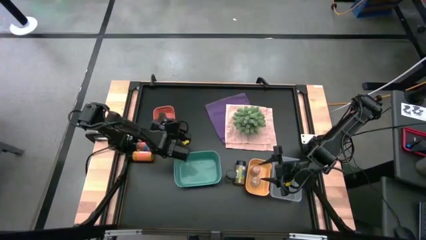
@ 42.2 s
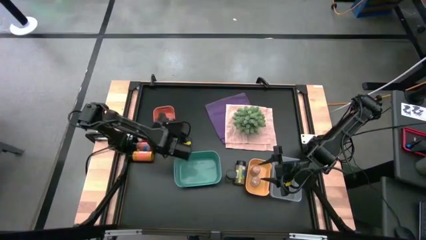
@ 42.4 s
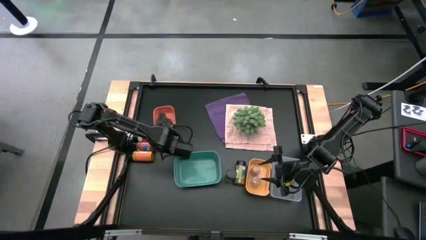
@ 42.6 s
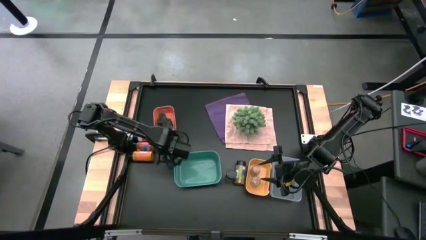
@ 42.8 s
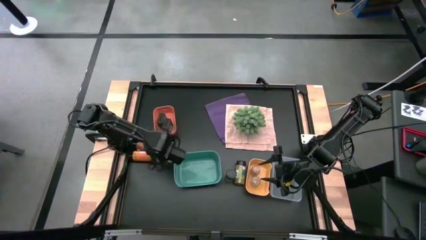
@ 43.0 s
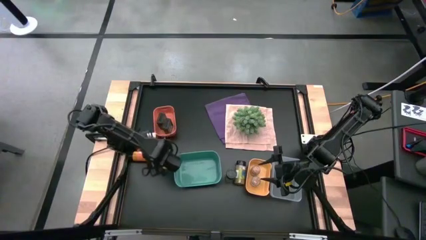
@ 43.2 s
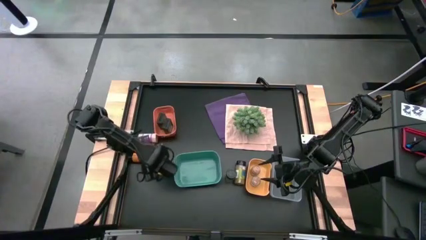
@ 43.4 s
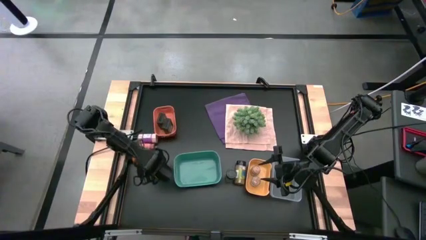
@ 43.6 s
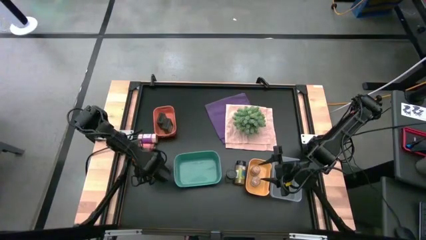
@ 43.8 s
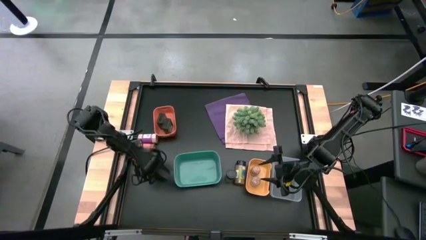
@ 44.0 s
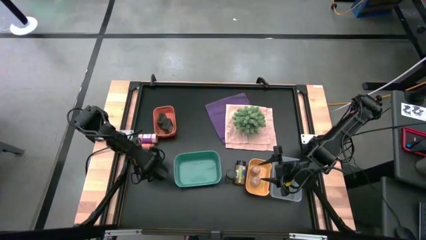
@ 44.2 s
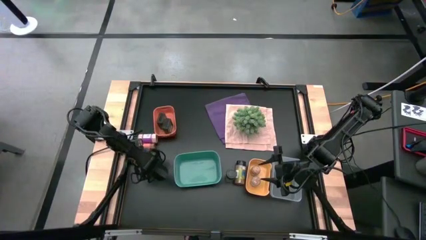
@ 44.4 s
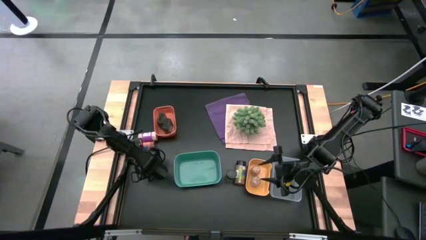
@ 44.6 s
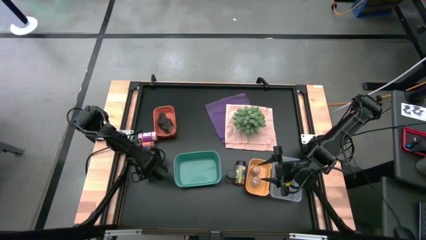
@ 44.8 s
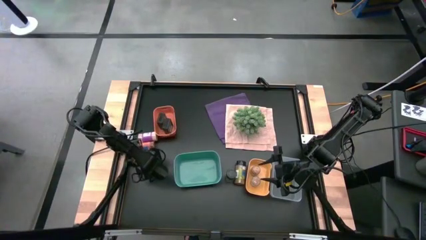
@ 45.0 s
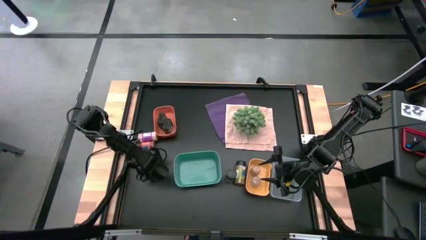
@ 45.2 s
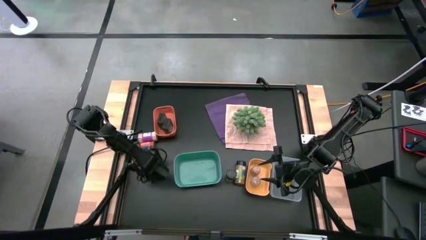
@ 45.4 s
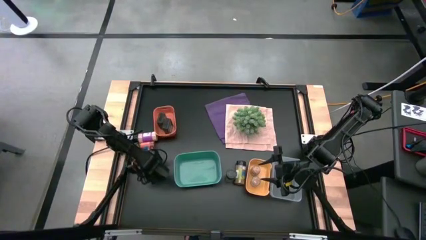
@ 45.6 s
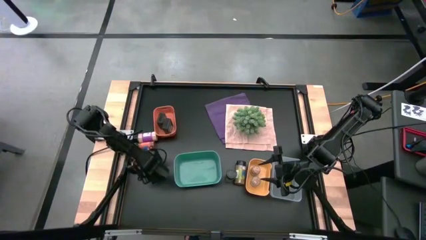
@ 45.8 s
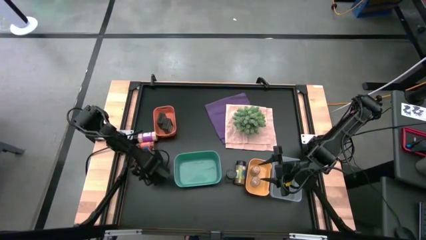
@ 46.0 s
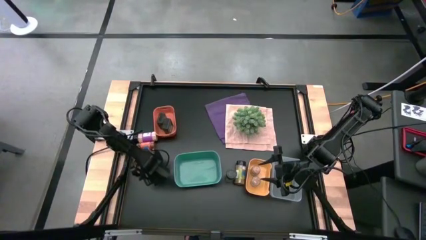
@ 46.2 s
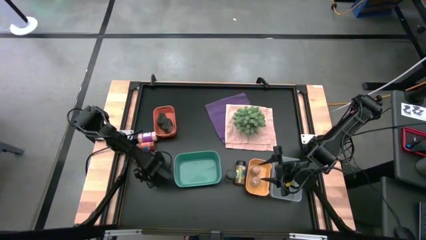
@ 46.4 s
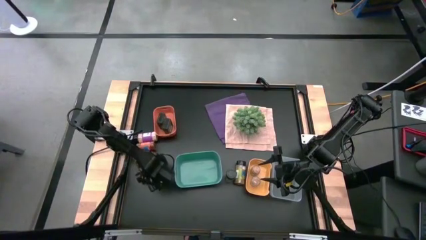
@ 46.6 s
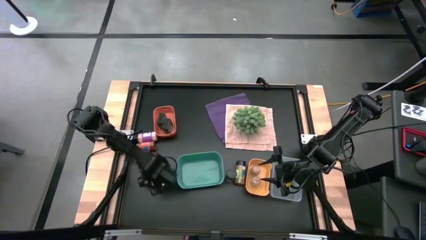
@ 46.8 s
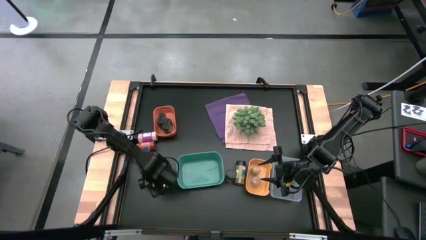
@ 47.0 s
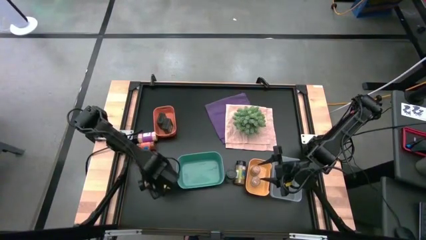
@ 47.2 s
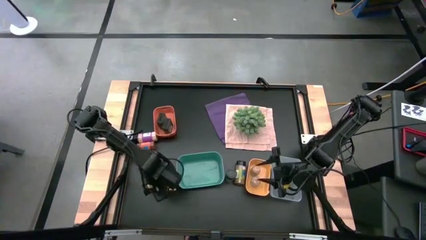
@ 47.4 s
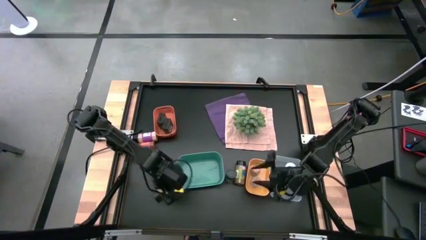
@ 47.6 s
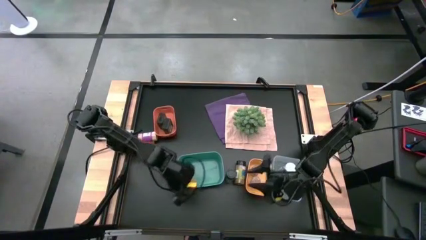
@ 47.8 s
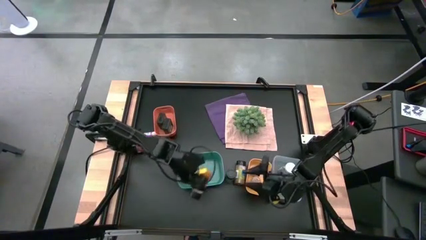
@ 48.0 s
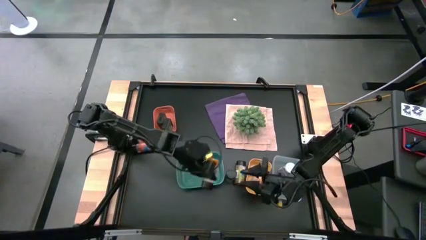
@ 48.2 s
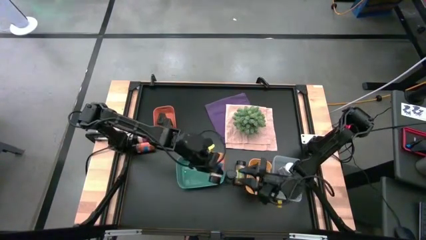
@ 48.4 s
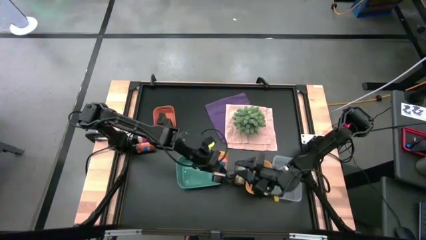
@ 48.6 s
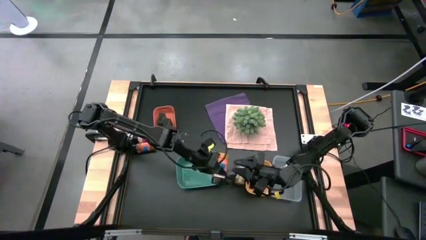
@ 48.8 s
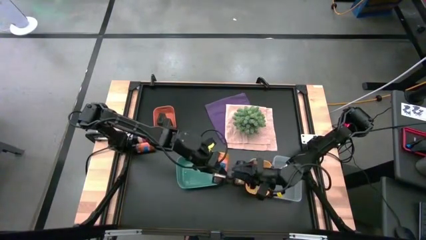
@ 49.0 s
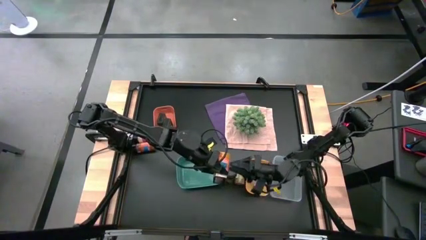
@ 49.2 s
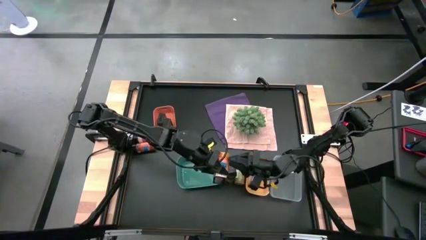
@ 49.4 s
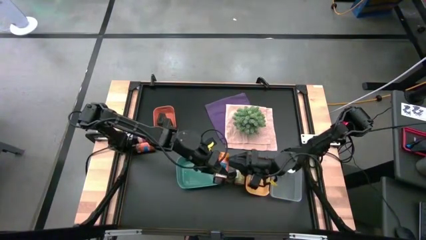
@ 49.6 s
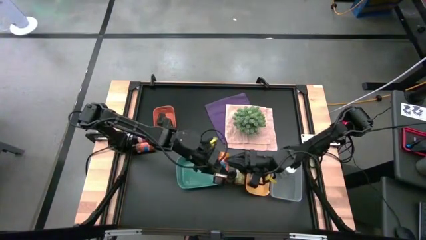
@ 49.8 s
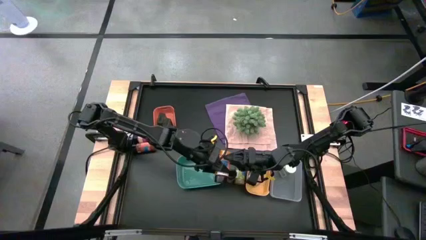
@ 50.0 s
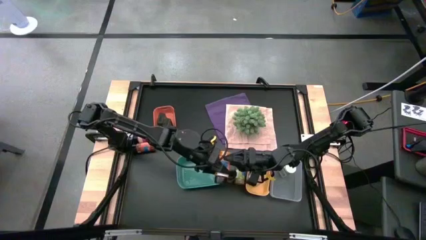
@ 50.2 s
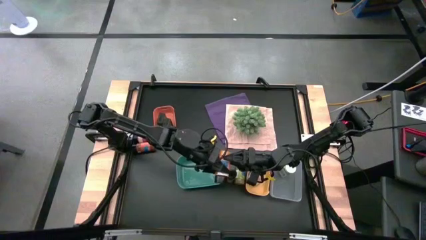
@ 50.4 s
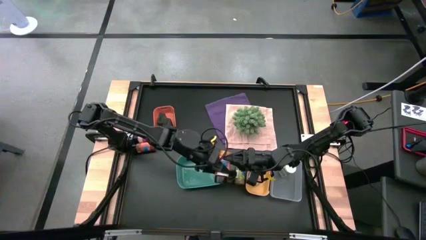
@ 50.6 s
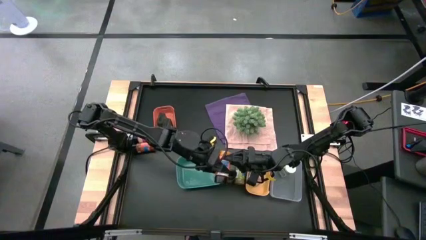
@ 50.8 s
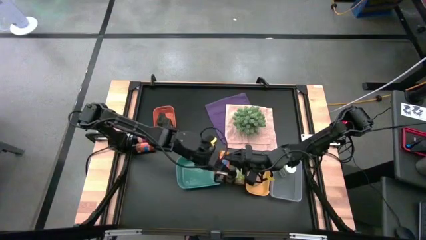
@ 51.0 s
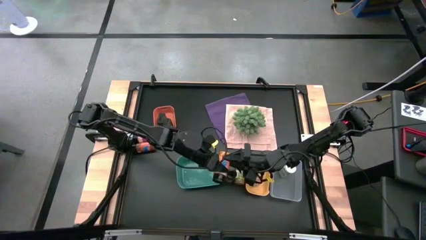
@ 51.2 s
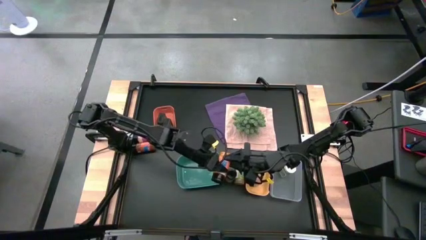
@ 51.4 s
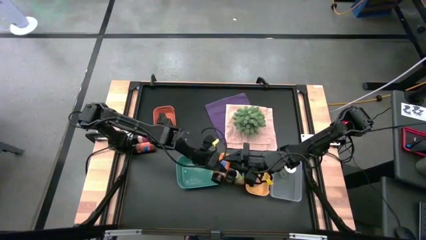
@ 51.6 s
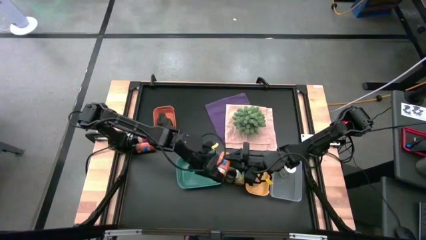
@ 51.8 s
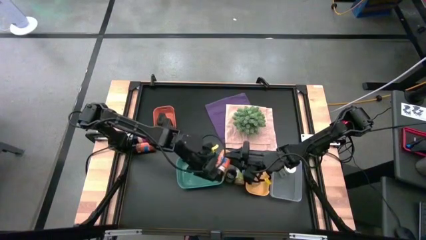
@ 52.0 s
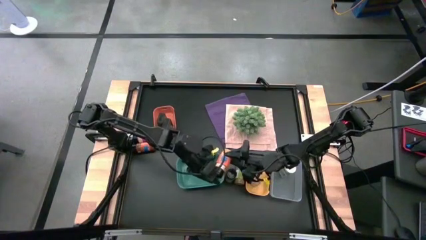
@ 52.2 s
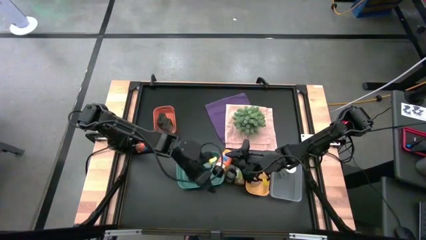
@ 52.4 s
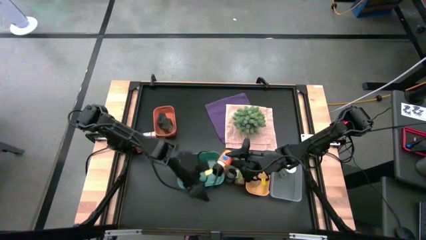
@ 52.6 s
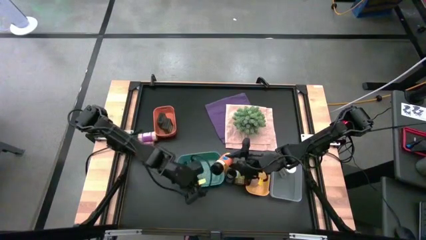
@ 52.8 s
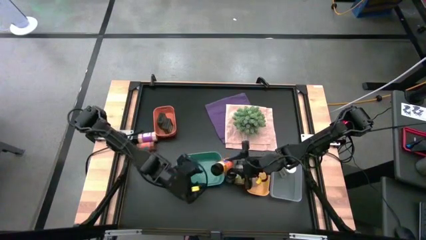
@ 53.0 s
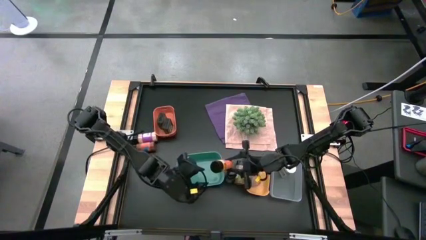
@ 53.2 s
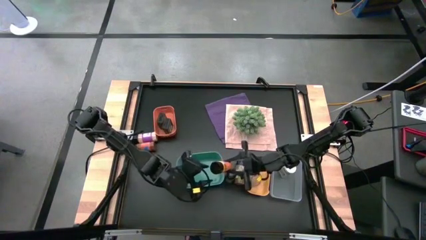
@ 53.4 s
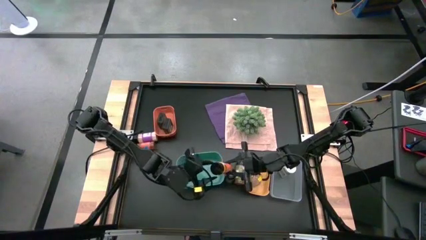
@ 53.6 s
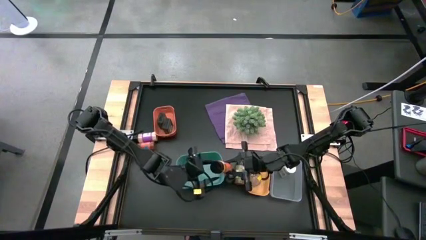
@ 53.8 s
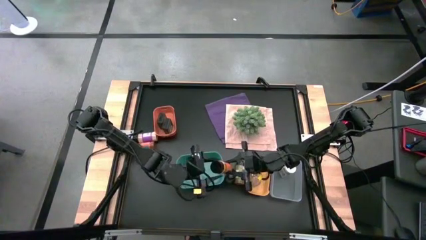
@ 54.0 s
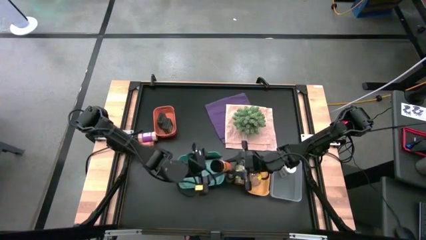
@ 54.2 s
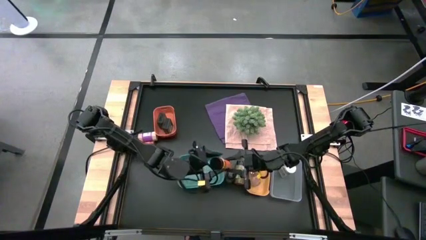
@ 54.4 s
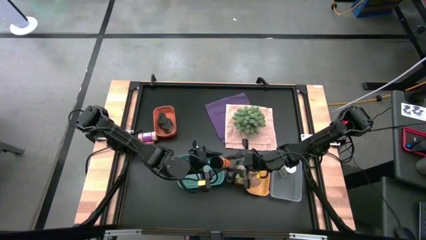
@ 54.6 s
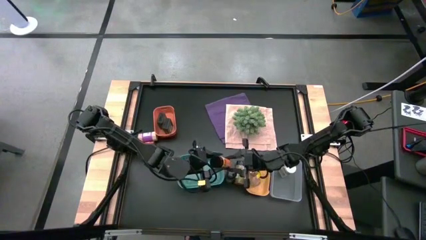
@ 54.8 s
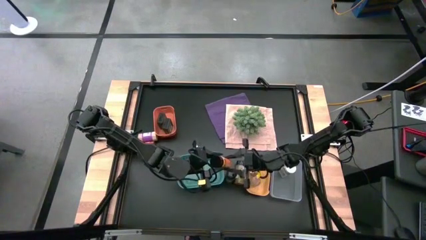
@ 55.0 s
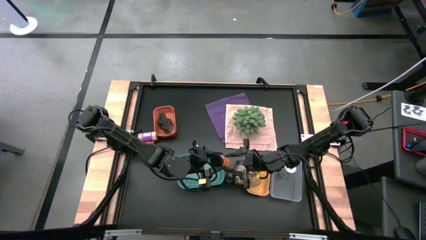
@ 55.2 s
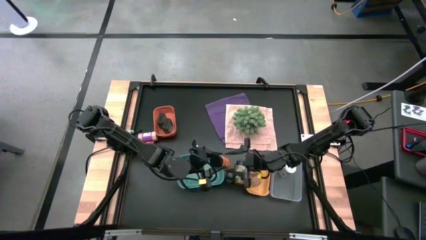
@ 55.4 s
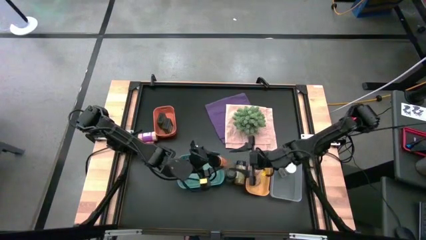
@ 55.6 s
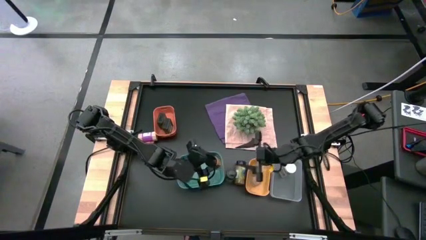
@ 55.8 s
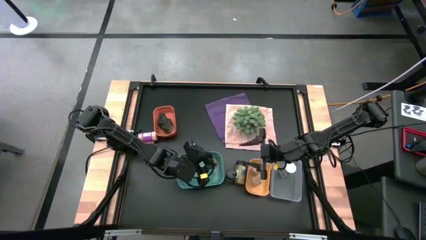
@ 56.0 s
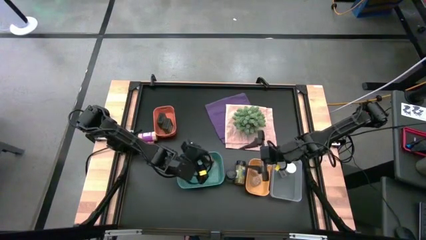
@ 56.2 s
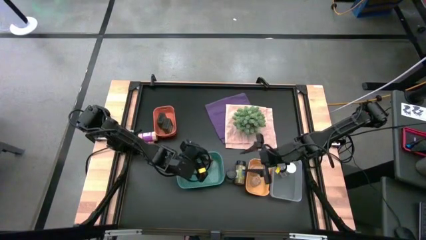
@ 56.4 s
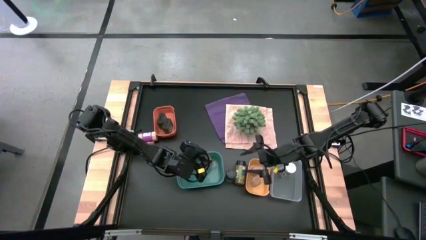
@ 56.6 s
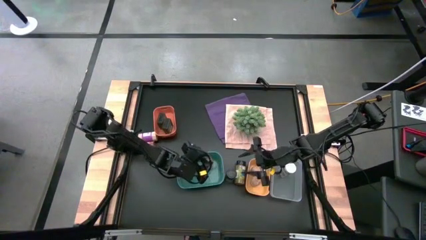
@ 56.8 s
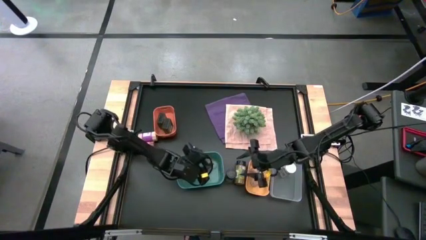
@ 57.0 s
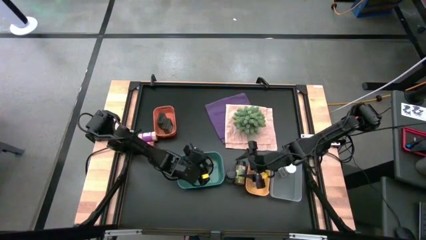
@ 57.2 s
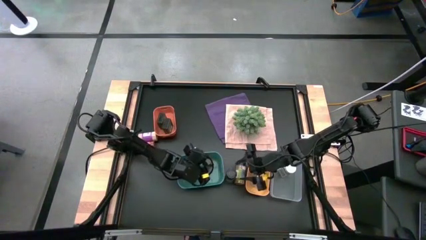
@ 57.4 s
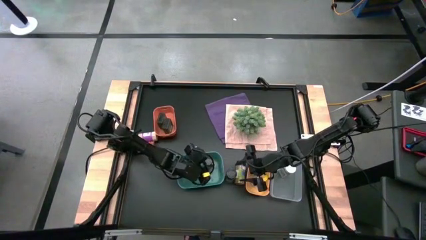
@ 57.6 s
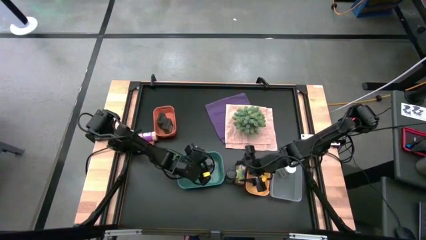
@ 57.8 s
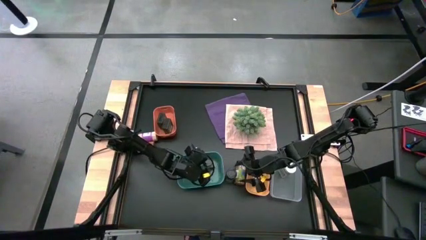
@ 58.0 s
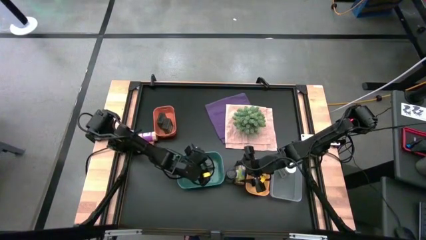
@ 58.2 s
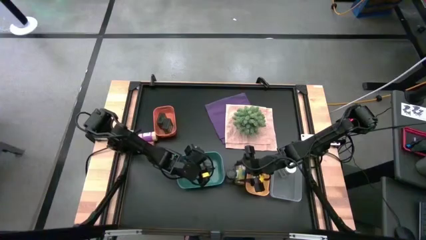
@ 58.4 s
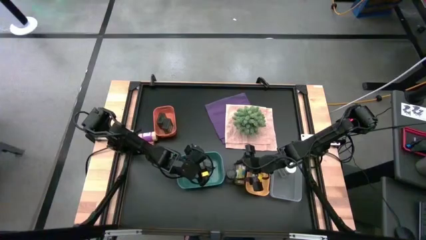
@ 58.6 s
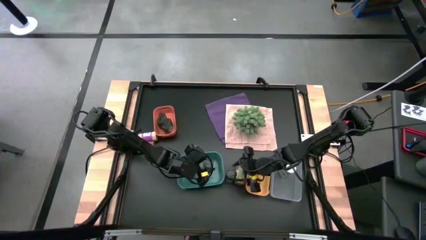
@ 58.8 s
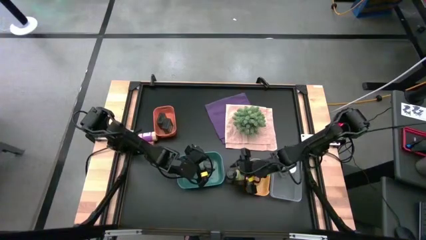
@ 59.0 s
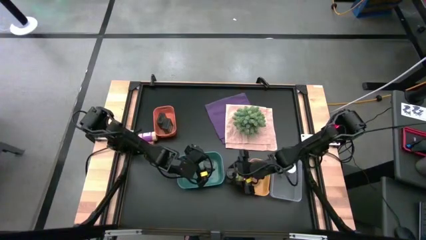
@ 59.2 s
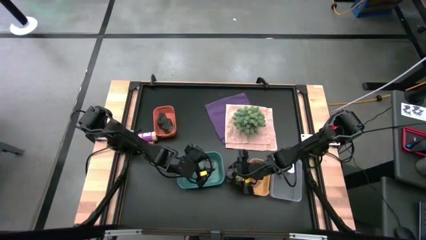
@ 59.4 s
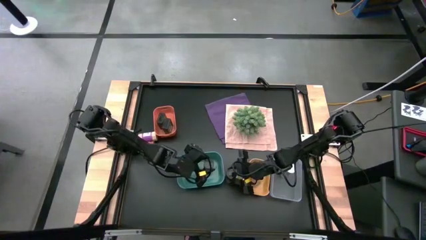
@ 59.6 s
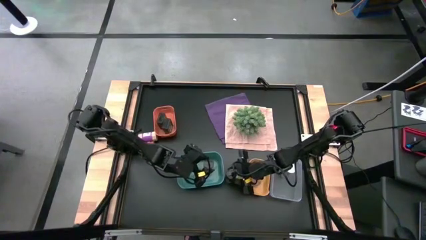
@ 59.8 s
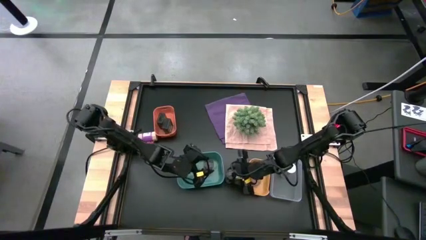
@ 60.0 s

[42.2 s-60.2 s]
Task: Sort spices by type
Put the yellow seasoning bottle into the blue bin
